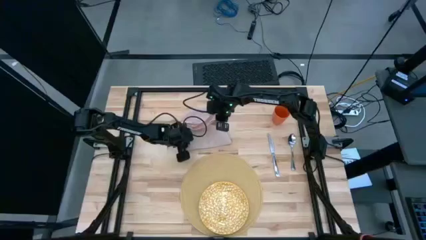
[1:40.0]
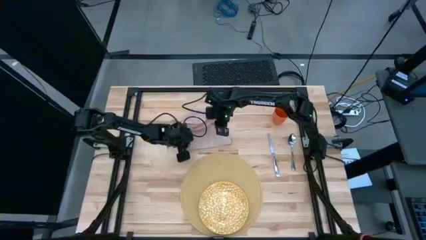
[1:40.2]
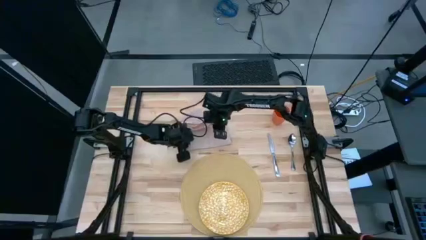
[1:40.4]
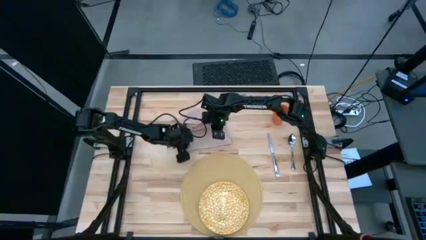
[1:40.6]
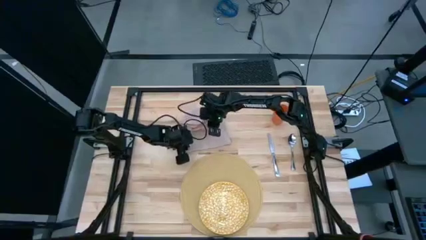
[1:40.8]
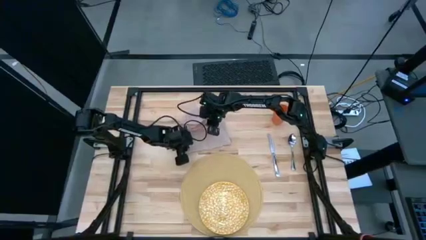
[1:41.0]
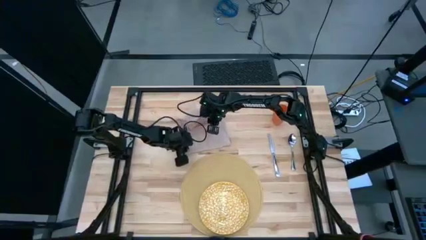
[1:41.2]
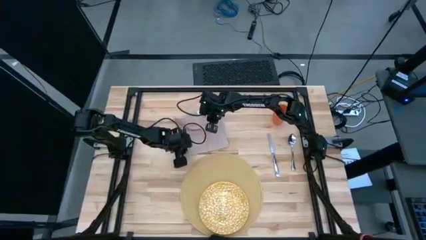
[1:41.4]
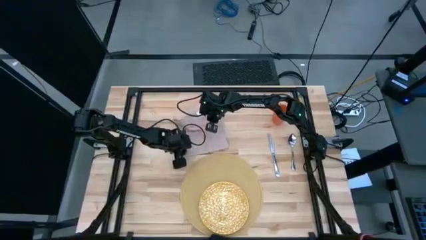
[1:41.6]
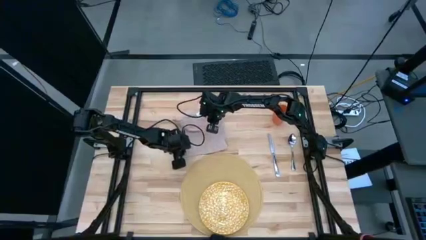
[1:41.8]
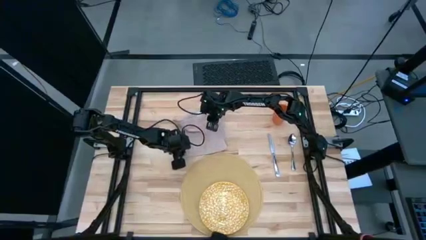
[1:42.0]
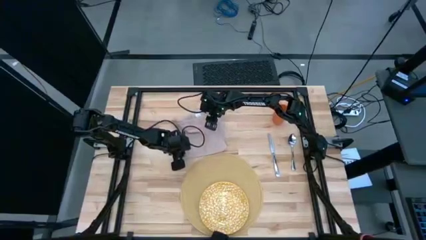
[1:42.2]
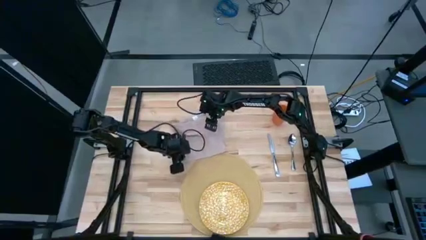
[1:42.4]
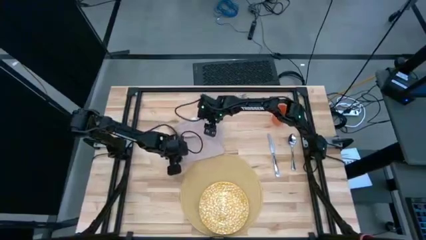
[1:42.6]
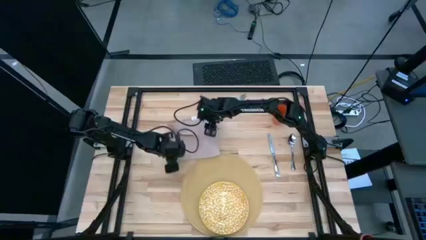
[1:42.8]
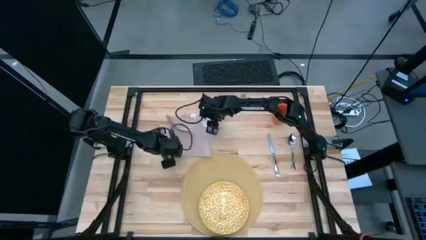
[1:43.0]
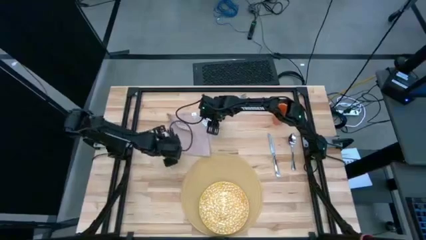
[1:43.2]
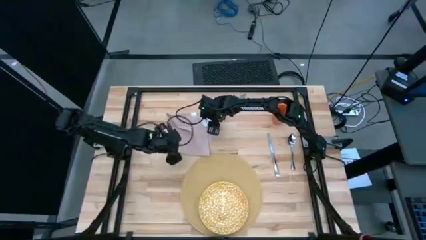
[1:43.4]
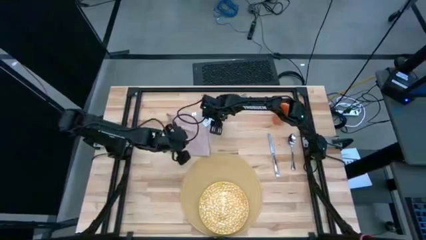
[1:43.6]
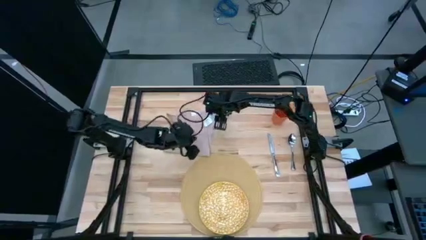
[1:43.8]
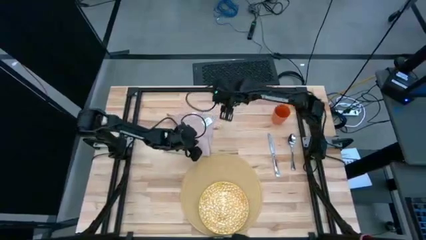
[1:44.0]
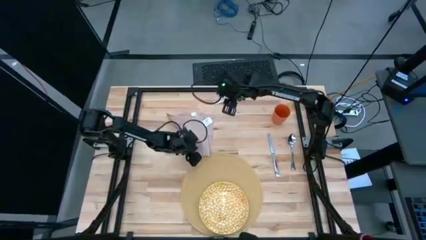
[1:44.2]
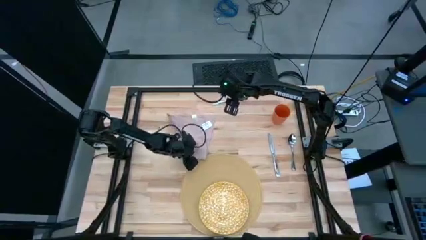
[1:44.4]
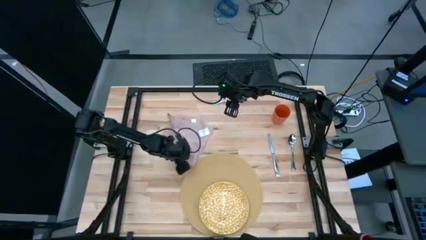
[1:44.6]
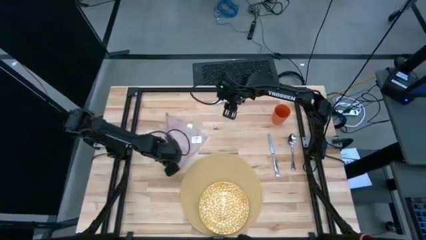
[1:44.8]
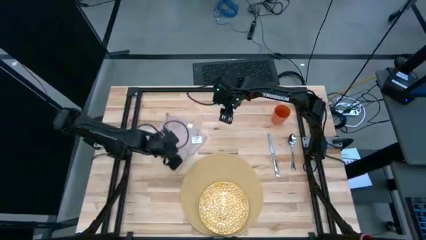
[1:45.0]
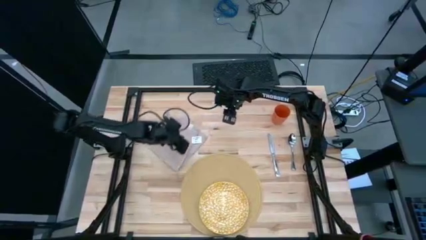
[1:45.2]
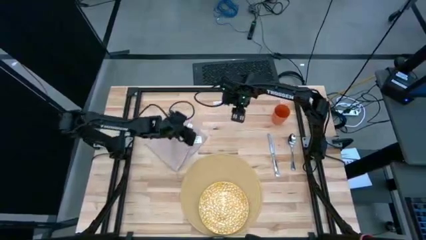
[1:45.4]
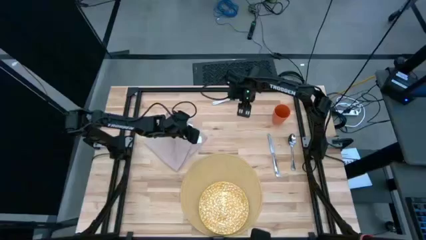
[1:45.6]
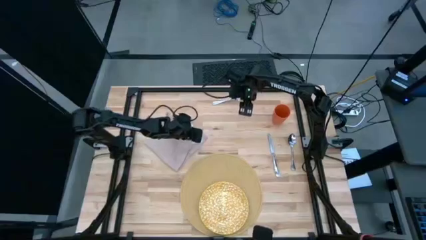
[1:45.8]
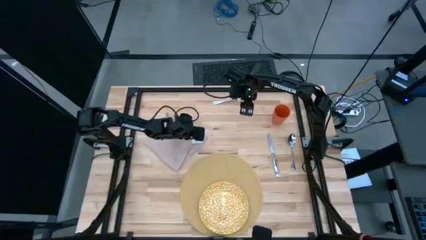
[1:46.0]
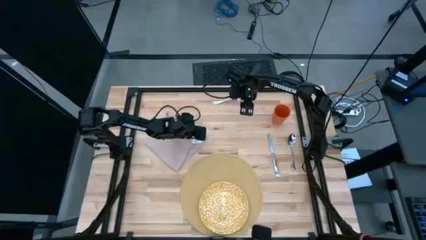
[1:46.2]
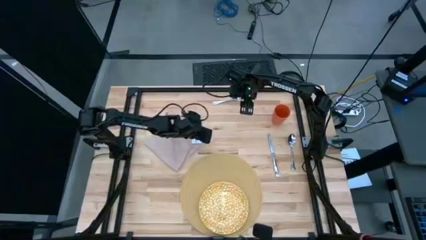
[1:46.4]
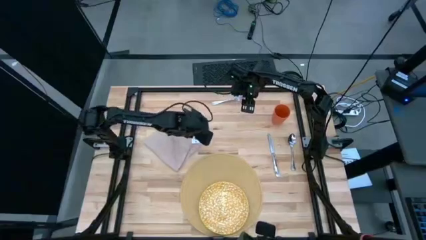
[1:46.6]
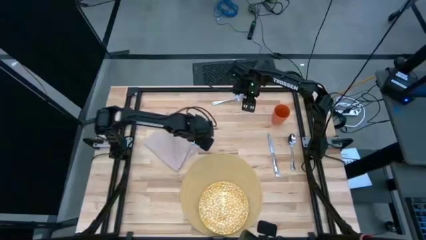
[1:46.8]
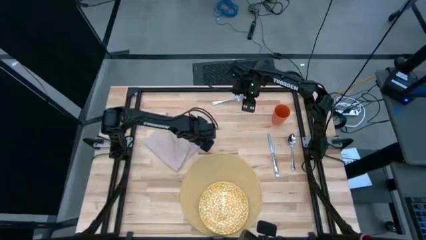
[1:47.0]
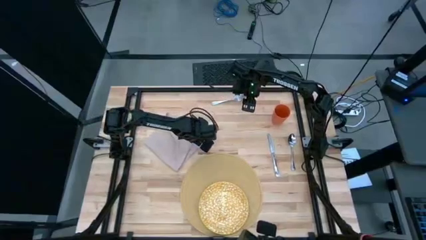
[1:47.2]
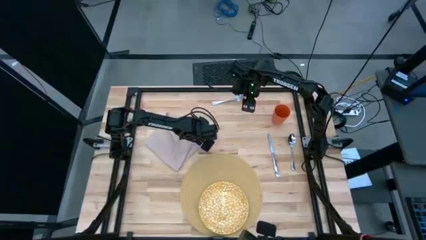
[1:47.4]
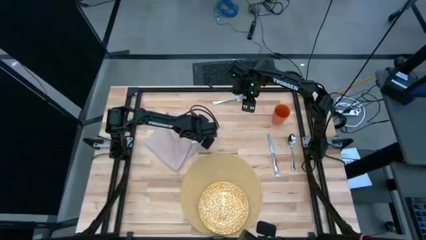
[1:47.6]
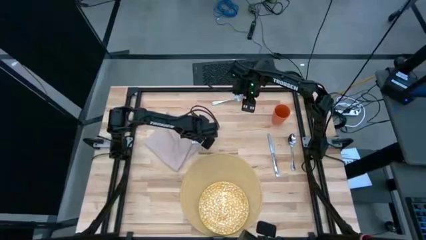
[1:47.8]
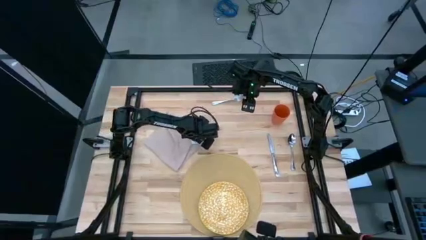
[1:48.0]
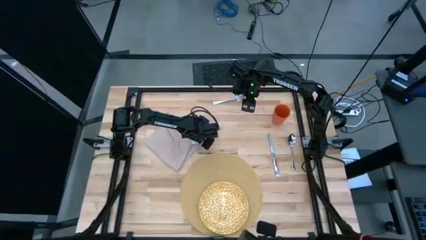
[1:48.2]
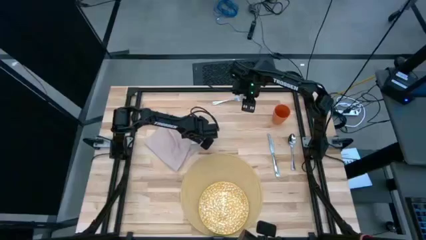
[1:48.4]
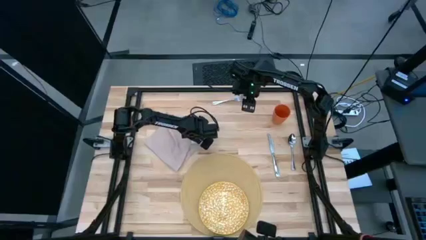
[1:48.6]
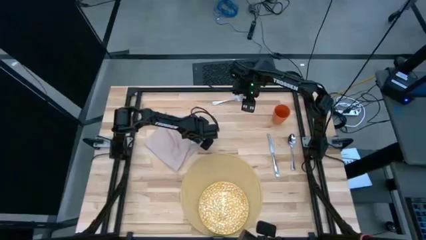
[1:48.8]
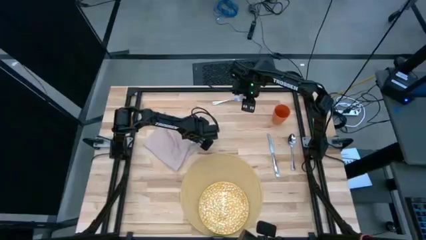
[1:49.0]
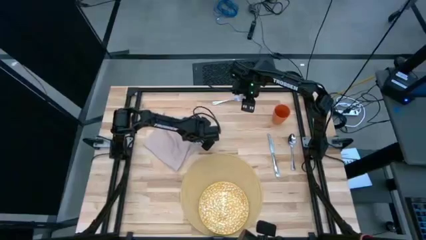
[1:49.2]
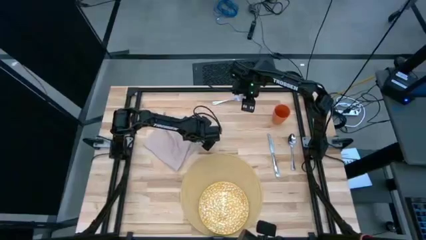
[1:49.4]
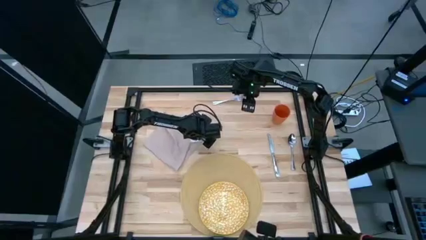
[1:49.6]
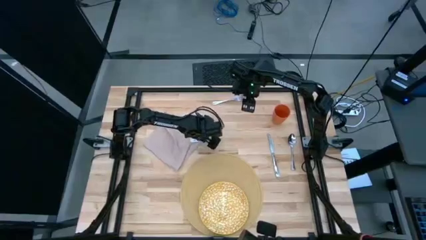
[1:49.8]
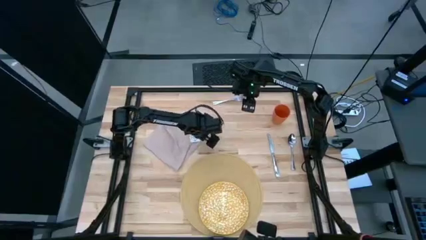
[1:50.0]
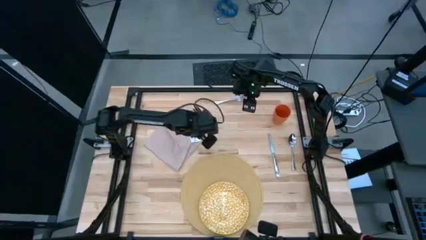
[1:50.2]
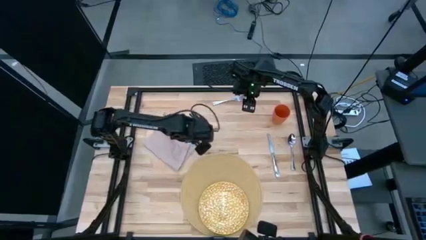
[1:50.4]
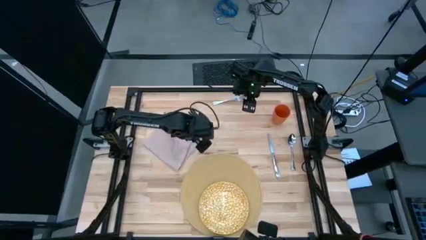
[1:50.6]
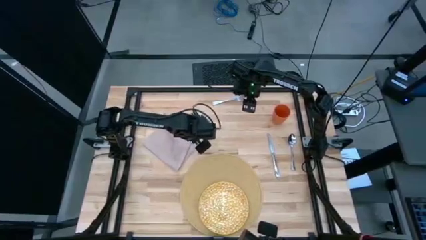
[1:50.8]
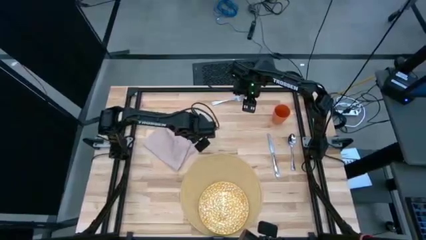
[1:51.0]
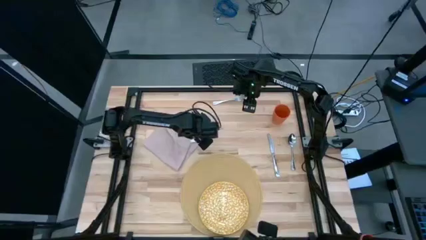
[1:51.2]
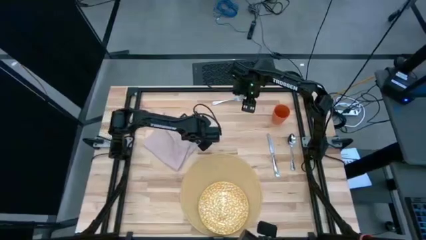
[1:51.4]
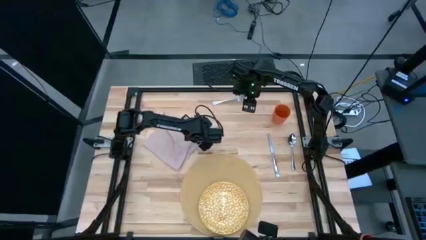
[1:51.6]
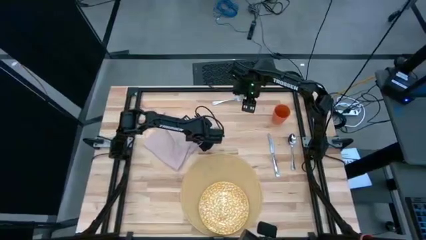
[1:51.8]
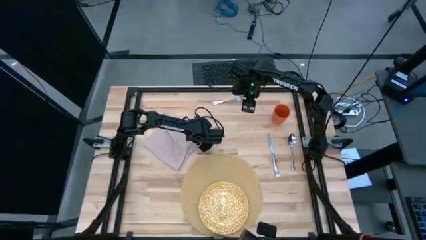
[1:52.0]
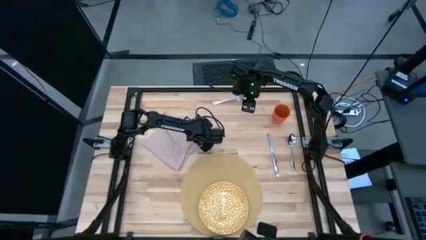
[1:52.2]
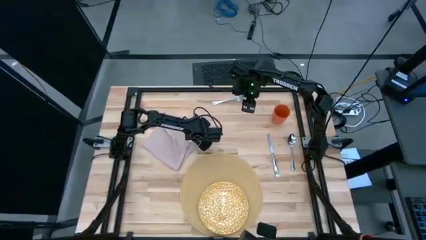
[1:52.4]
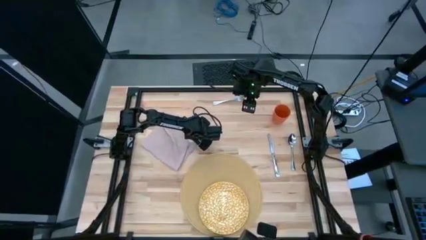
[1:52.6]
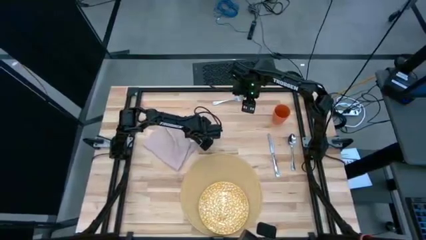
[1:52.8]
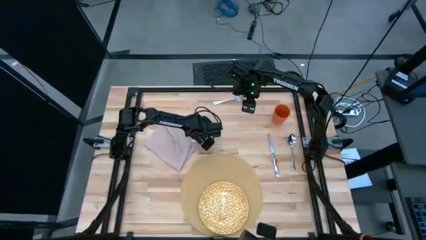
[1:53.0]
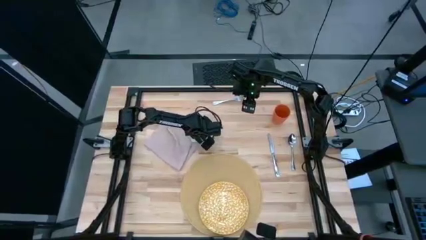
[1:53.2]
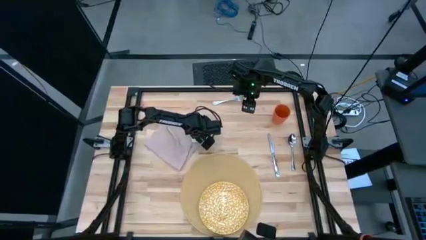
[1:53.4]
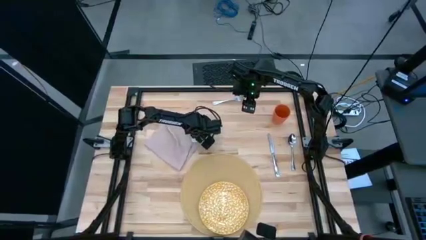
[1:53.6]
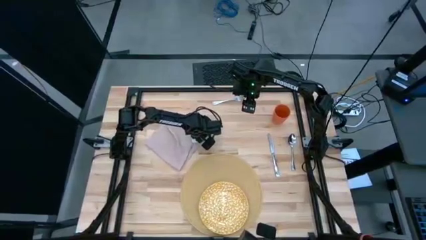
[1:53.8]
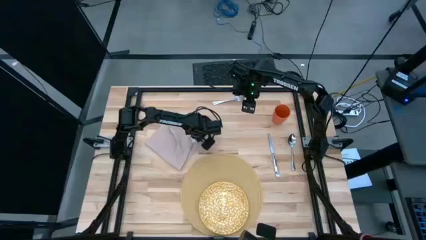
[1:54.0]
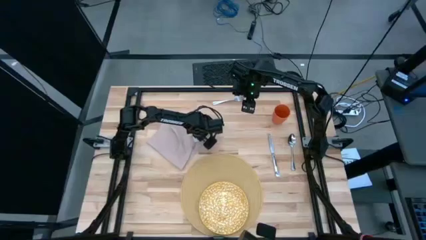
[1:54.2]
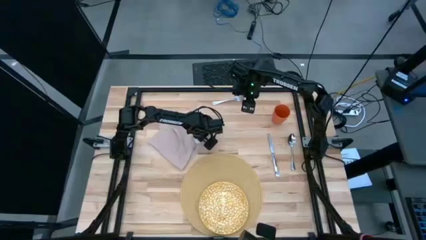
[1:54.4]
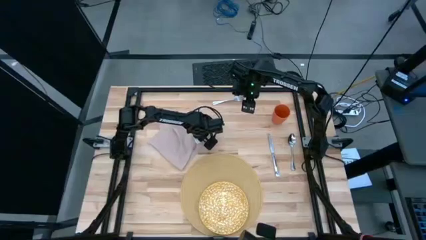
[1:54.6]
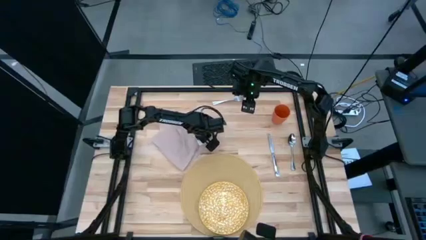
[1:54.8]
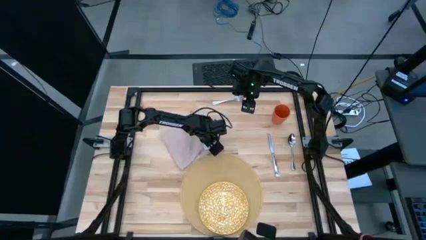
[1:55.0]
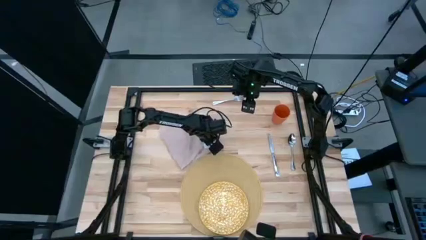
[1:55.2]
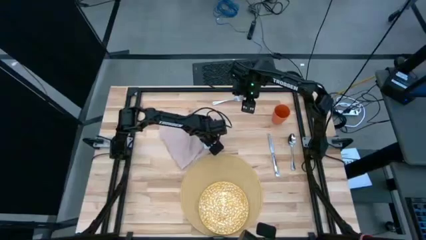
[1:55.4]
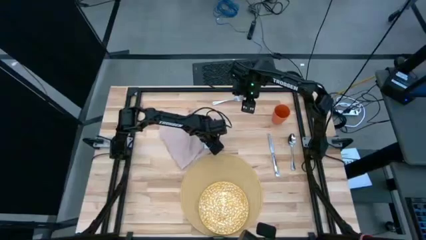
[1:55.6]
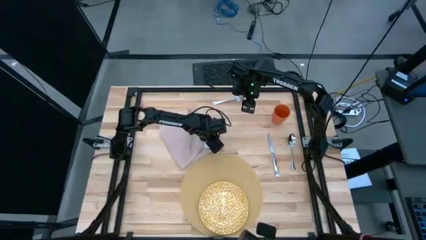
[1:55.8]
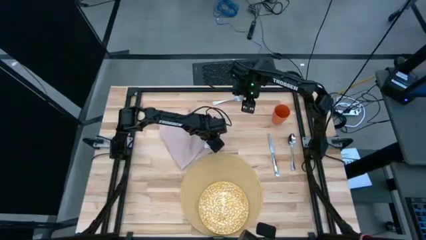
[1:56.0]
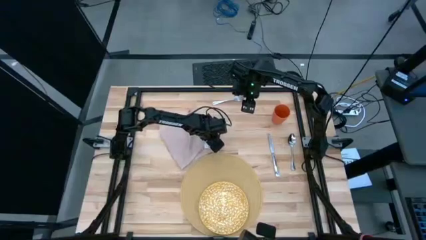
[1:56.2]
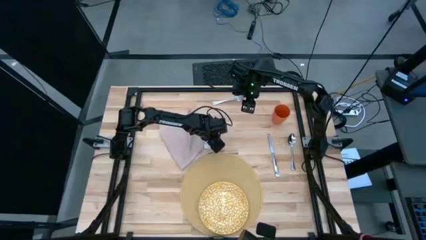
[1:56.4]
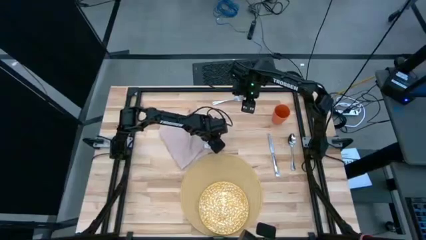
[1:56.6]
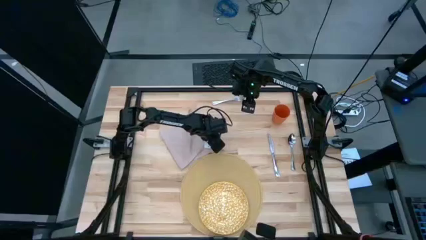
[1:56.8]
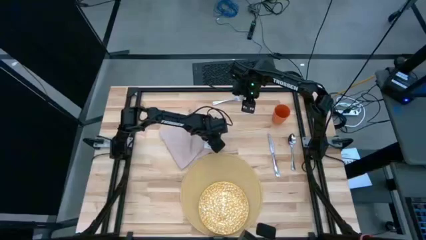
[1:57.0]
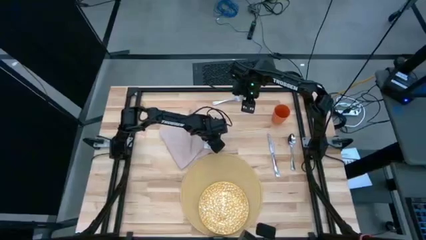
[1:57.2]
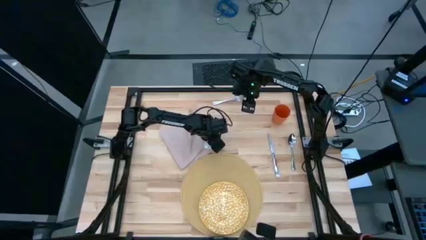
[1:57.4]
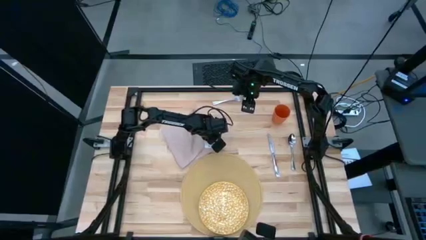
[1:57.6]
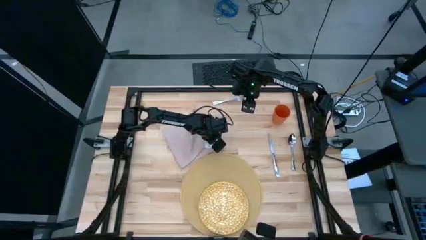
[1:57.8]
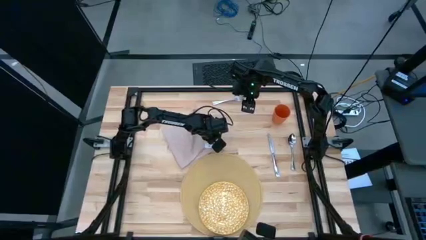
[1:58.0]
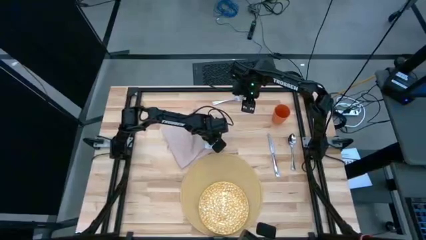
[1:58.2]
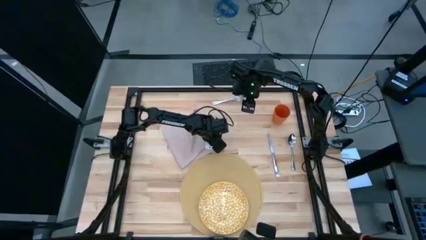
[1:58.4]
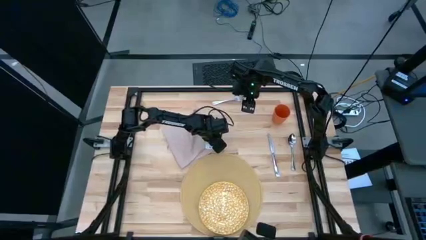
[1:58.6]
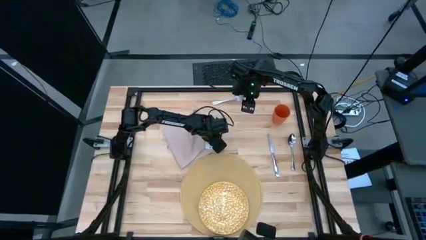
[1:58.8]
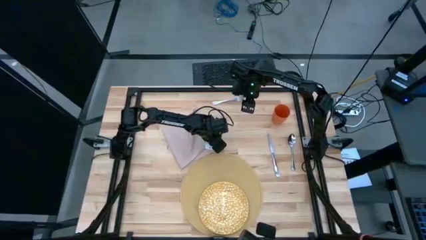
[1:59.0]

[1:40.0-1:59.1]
Task: Set table place
Fold the brown table napkin
